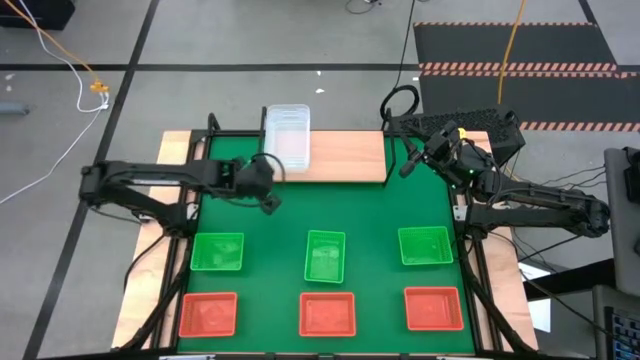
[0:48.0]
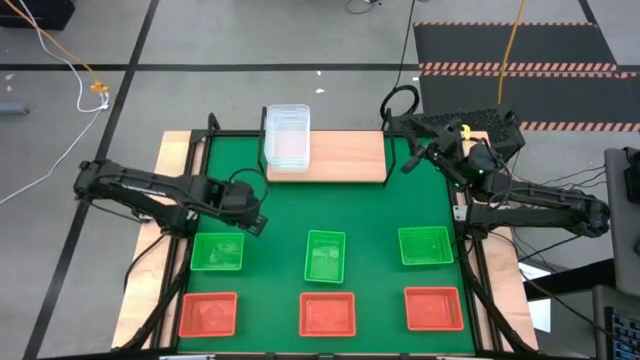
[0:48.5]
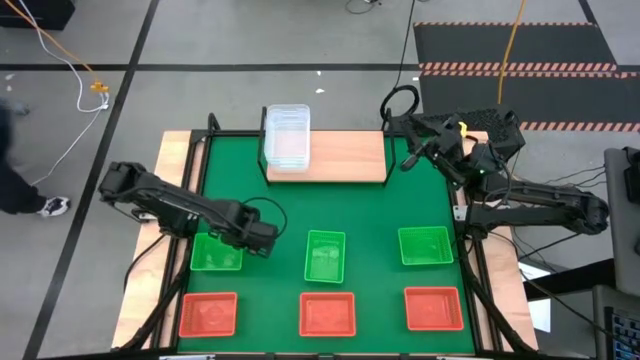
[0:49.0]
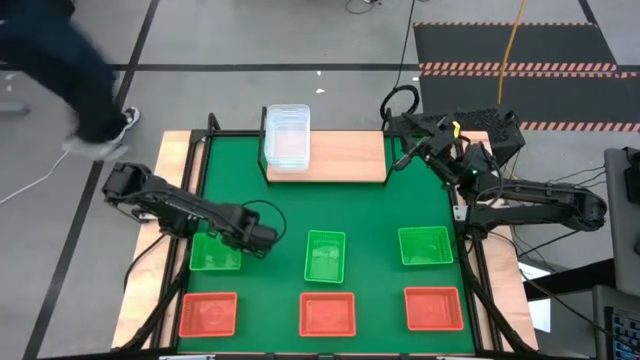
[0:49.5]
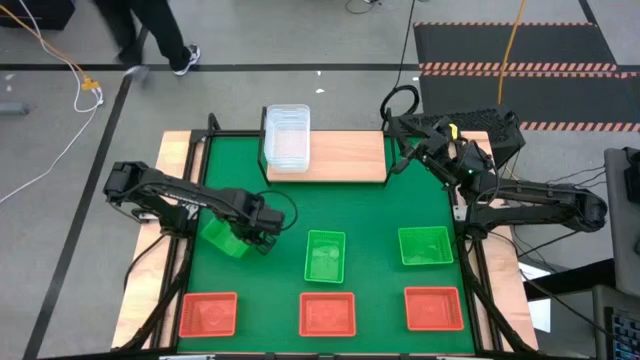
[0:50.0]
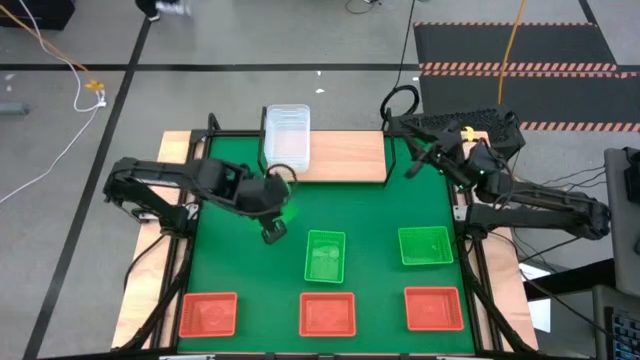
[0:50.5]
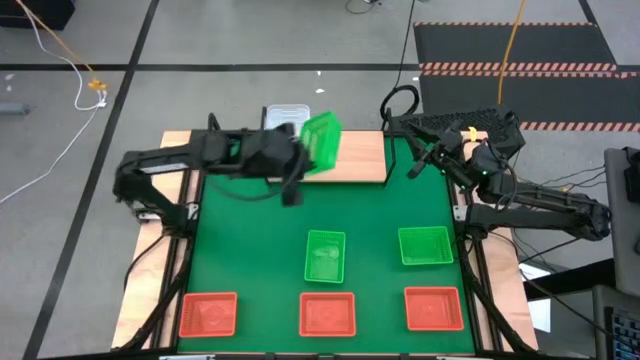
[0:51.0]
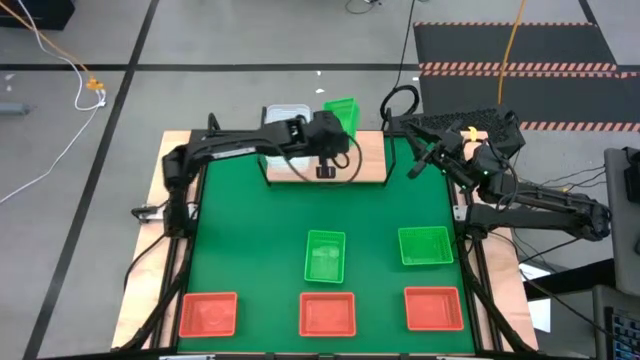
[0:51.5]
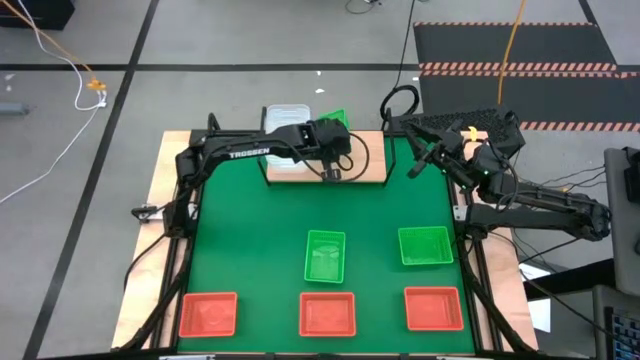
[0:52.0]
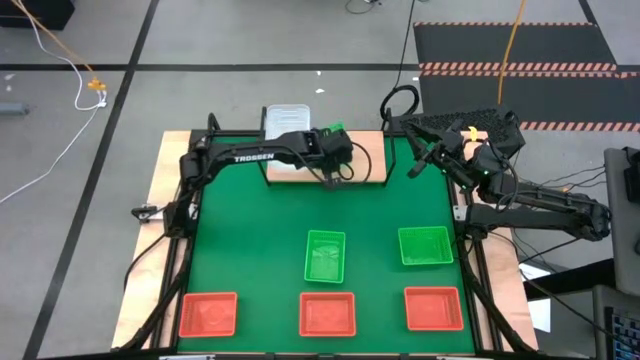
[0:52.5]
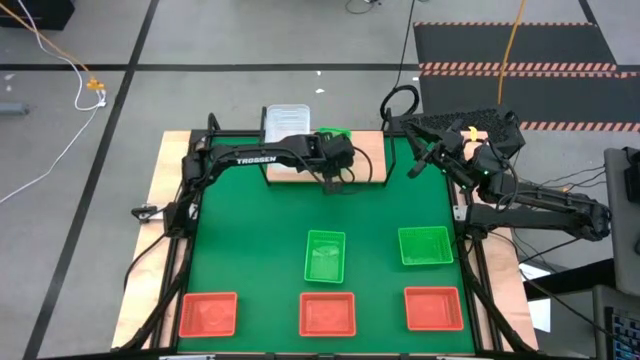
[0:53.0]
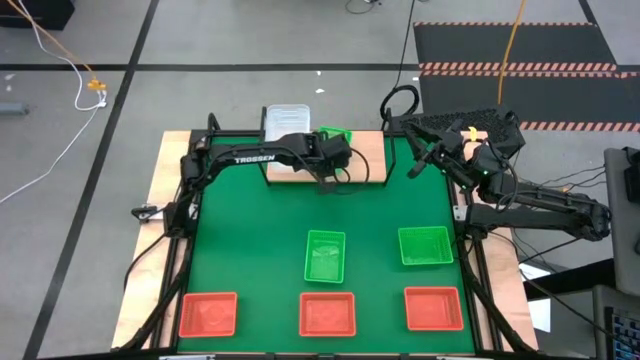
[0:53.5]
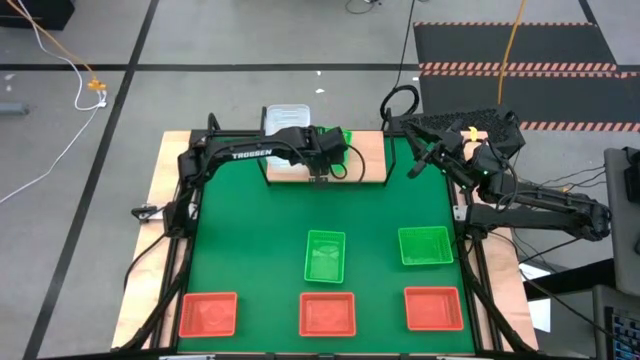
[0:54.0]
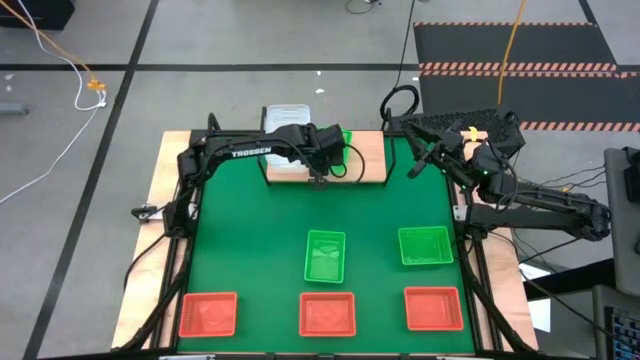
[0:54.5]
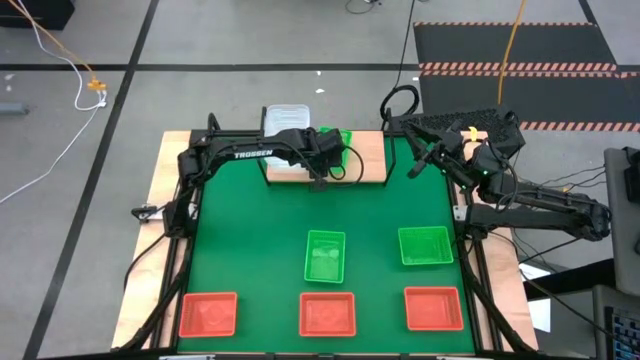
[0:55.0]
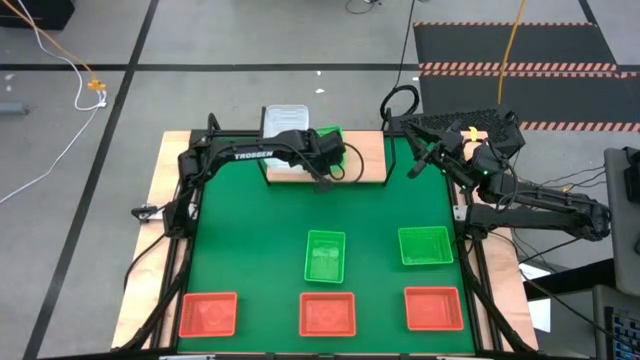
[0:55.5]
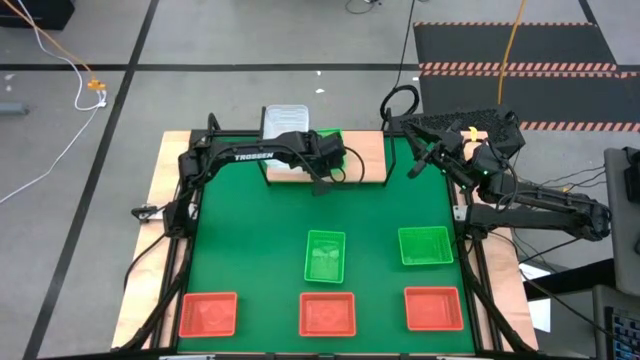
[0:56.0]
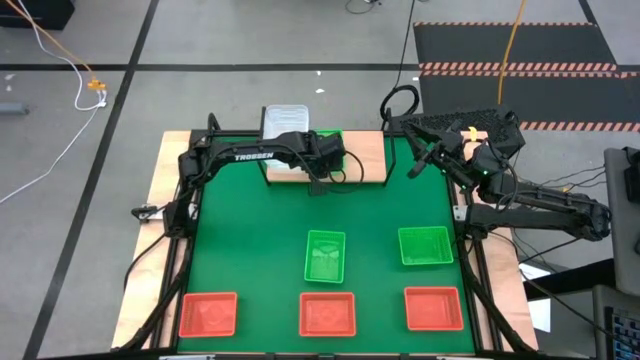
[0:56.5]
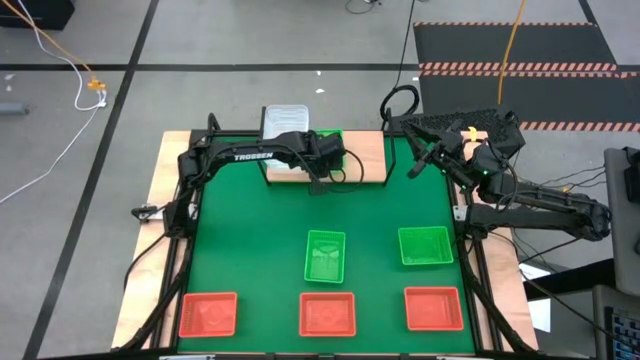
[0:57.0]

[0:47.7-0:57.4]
Task: Stack baskets on shelf by color
Put the left green bin on the shelf

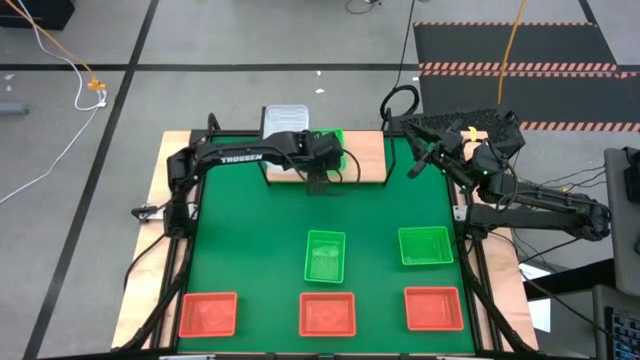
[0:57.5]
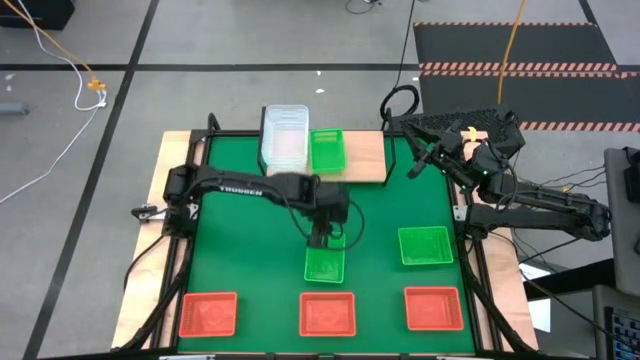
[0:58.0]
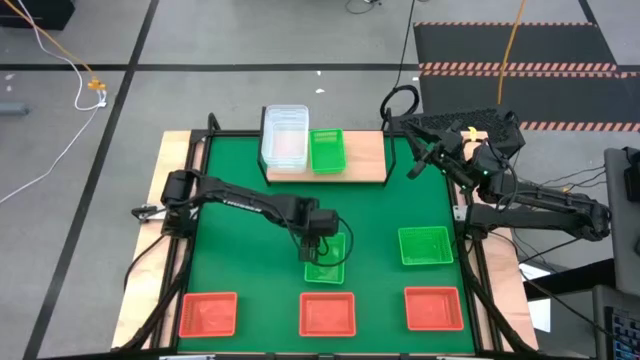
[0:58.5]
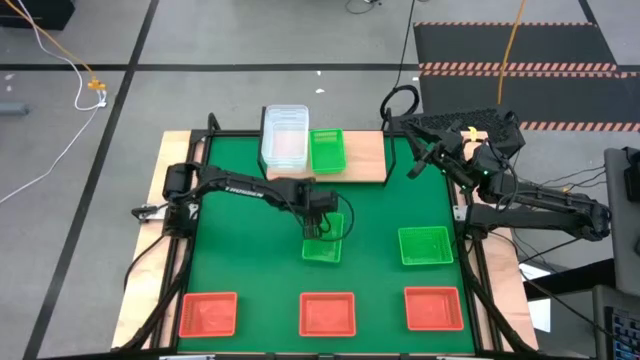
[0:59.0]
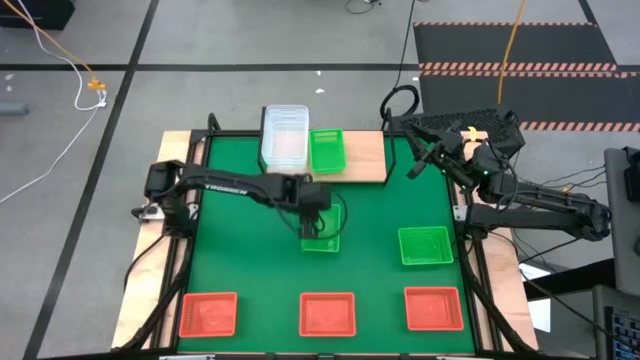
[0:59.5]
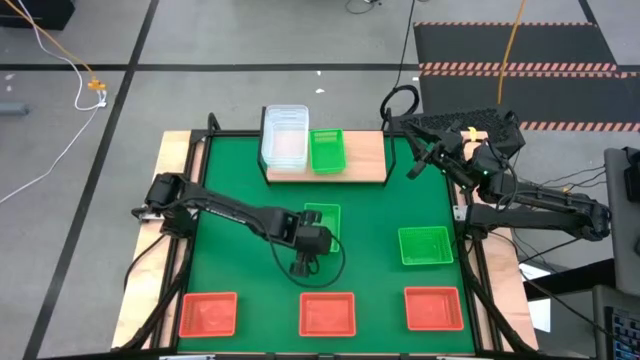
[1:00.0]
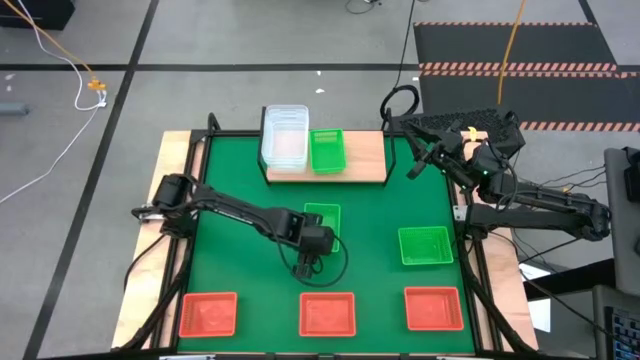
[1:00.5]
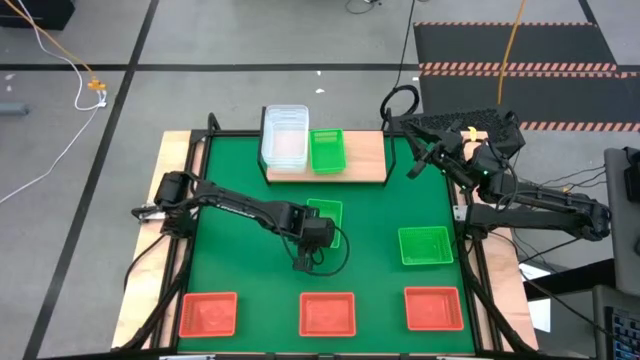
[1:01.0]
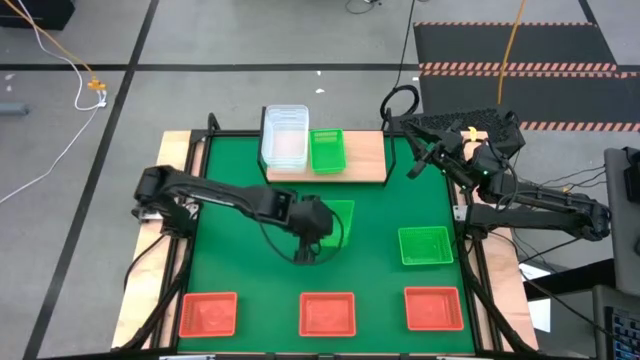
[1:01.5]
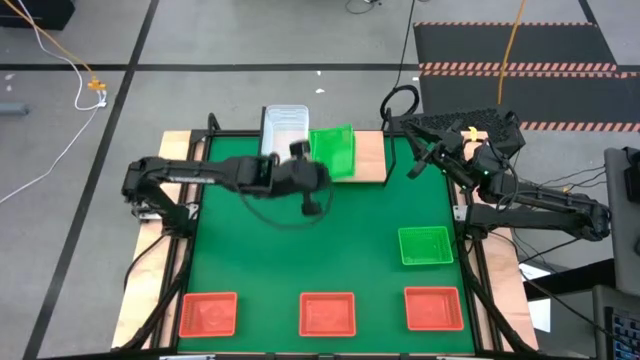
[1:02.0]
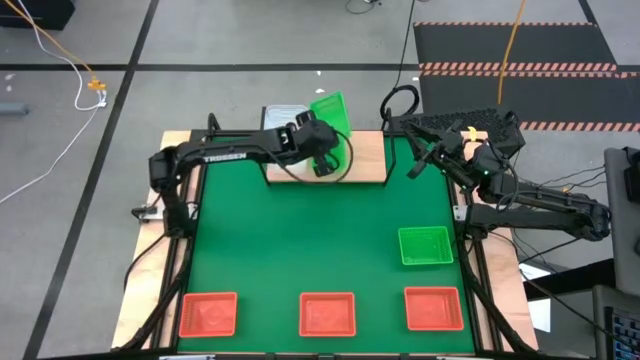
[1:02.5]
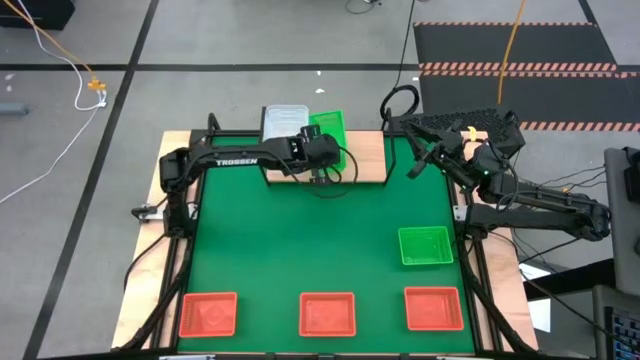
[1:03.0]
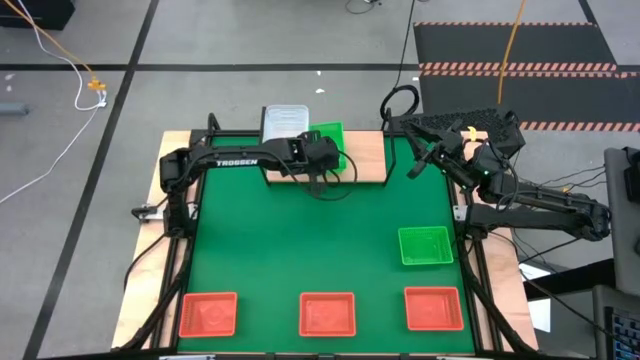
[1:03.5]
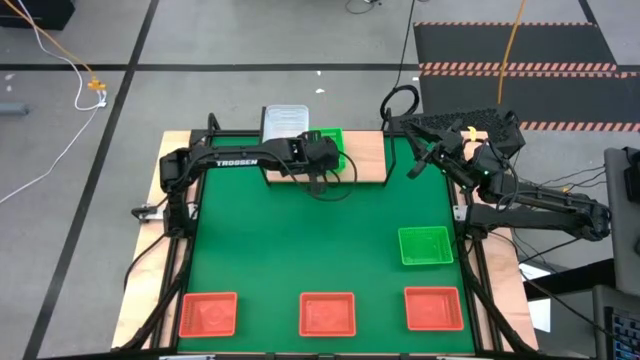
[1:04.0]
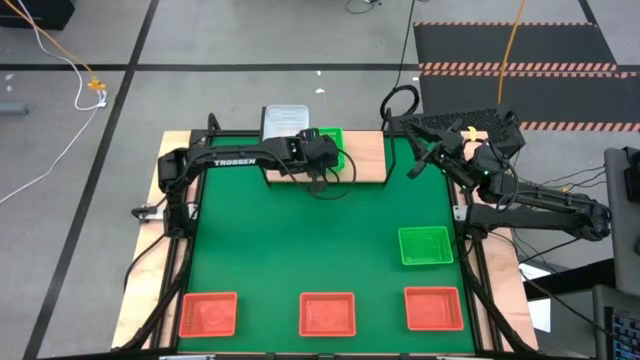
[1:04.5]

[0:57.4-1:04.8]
Stack the left green bin on the top of the other green bin on the shelf

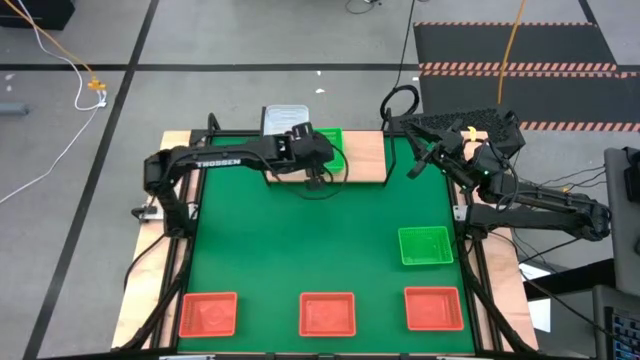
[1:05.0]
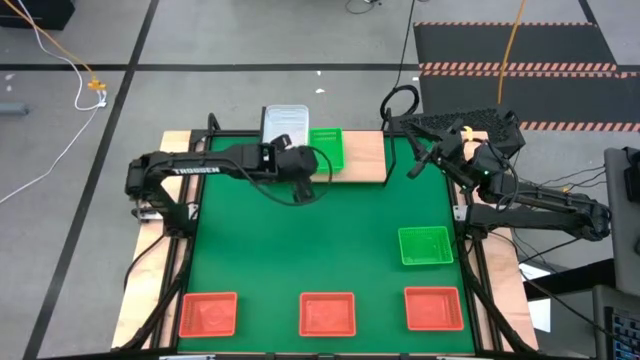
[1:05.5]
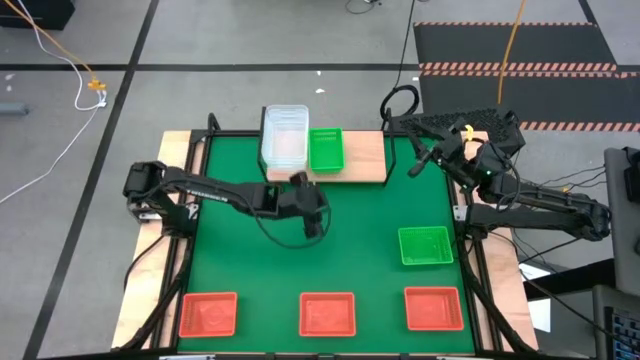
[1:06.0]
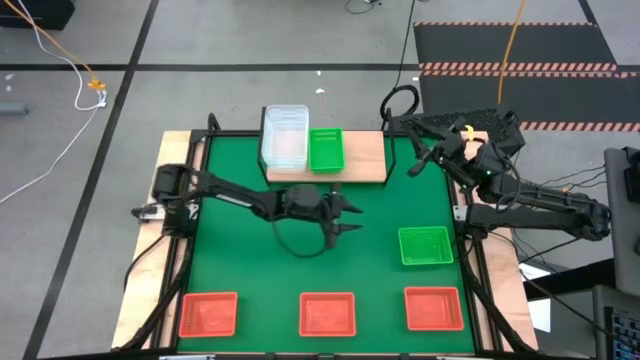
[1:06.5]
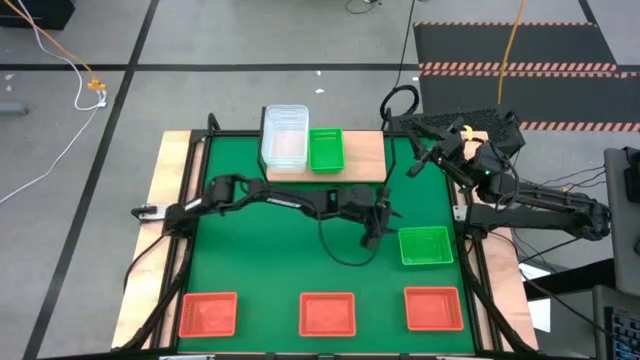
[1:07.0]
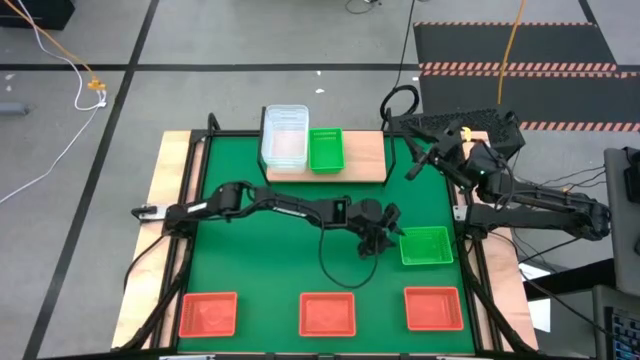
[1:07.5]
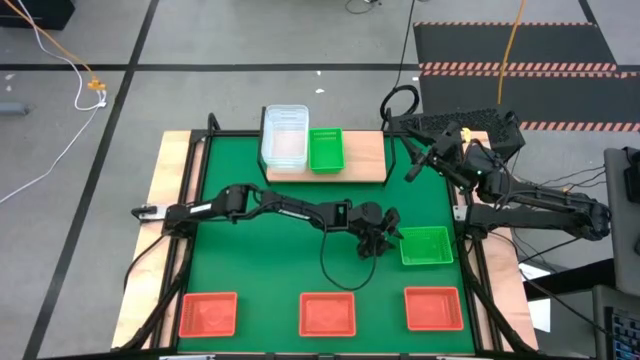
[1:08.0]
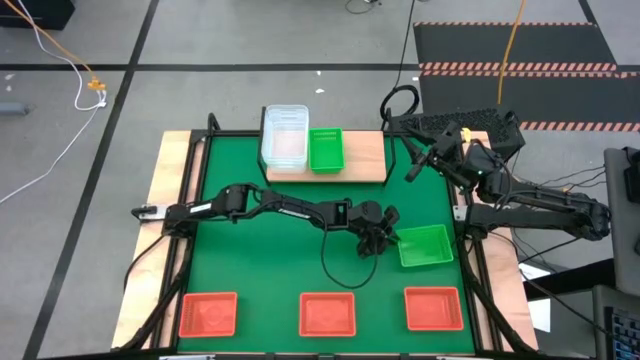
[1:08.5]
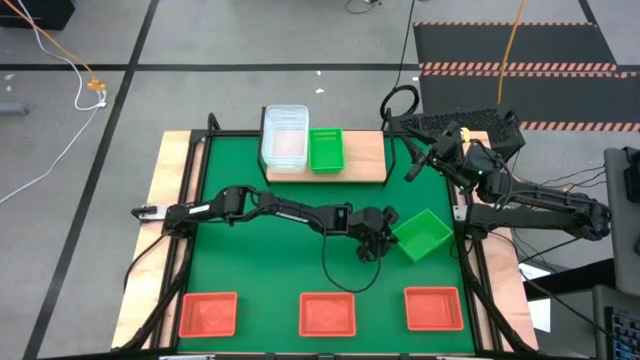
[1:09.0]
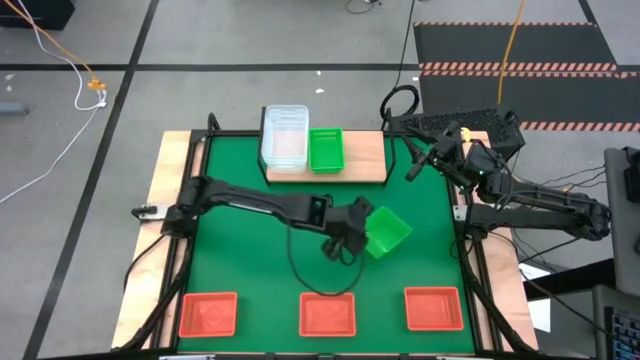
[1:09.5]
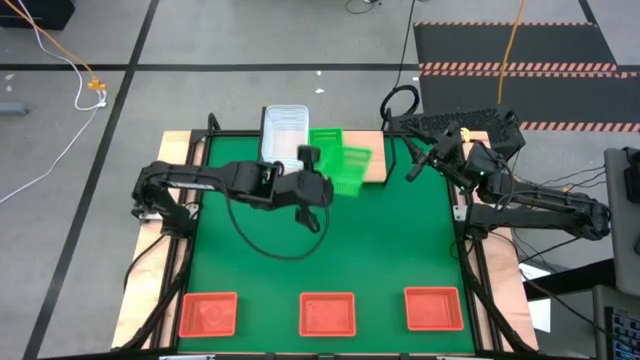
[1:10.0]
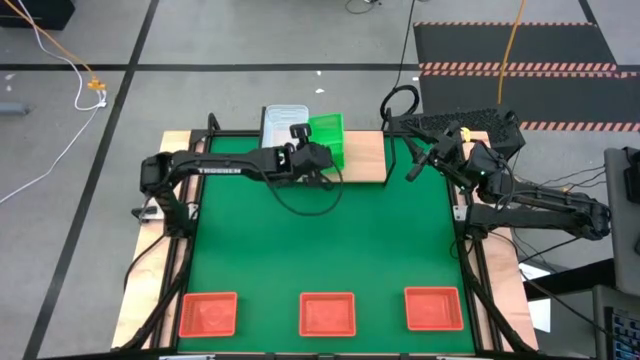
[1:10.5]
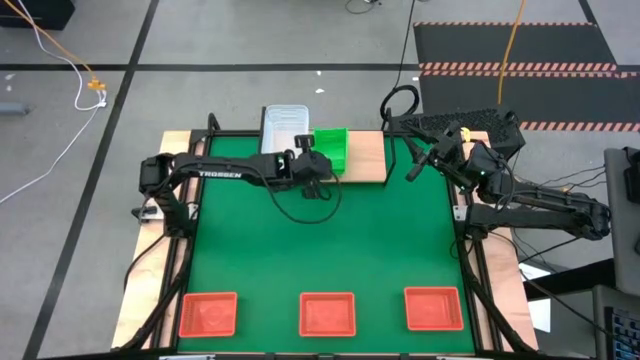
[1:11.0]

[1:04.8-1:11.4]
Stack the left green bin on the top of the other green bins on the shelf

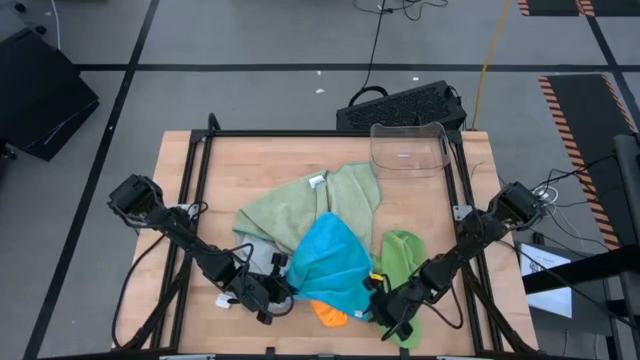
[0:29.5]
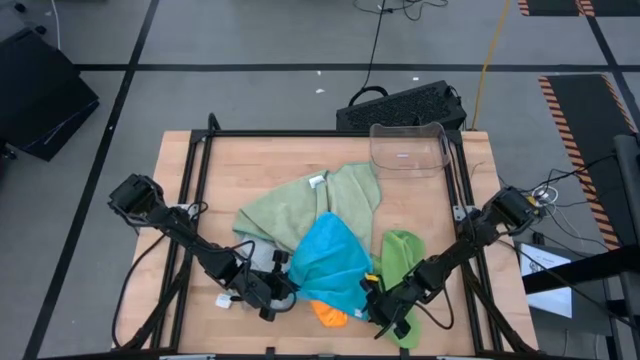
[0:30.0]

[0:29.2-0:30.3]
Task: Fold microfiber towels
Fold the blue microfiber towel
